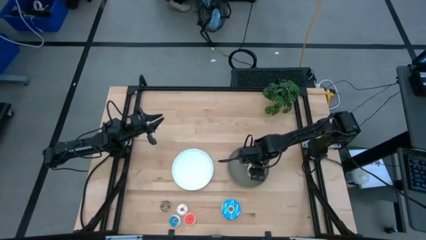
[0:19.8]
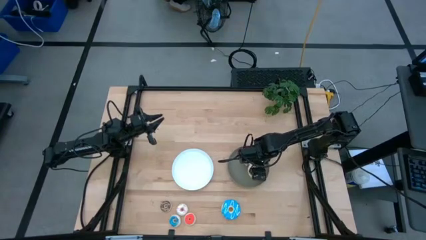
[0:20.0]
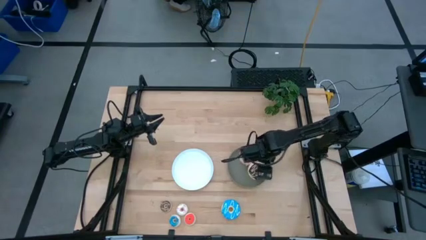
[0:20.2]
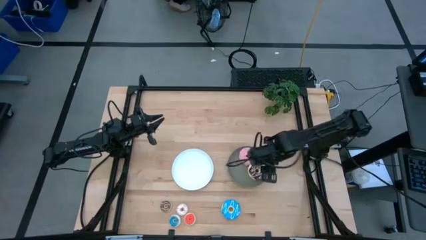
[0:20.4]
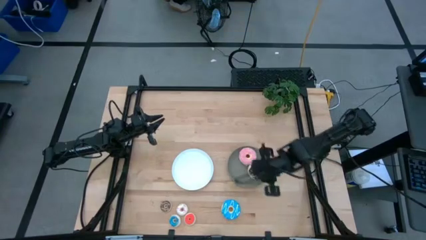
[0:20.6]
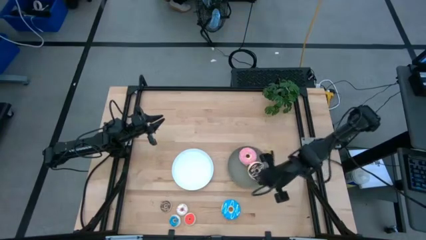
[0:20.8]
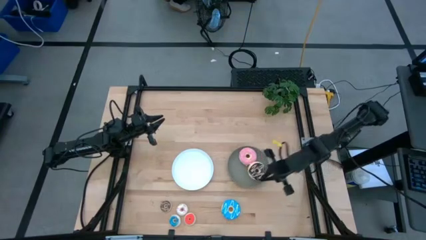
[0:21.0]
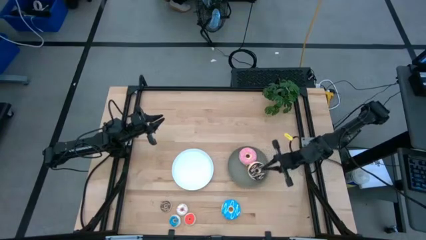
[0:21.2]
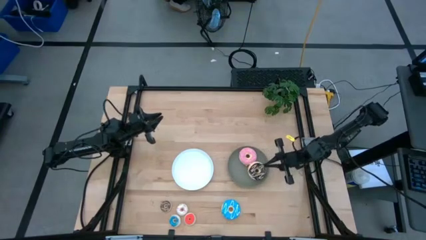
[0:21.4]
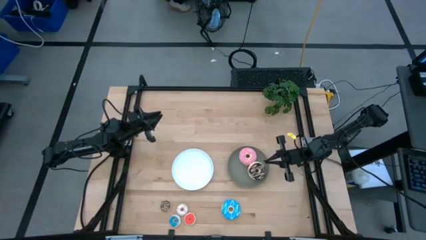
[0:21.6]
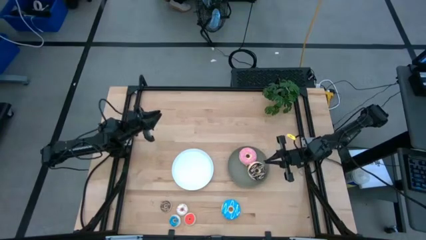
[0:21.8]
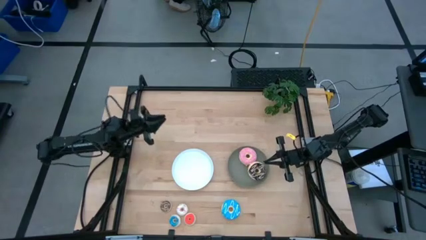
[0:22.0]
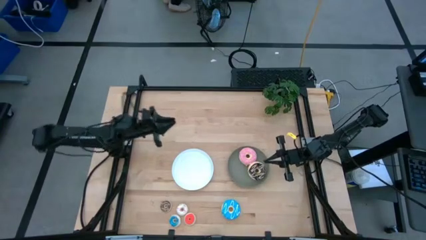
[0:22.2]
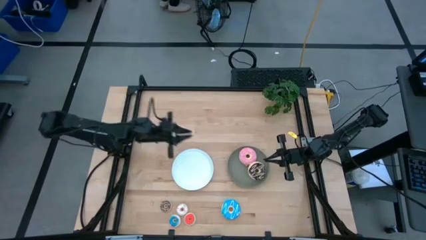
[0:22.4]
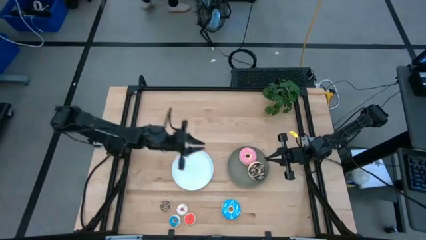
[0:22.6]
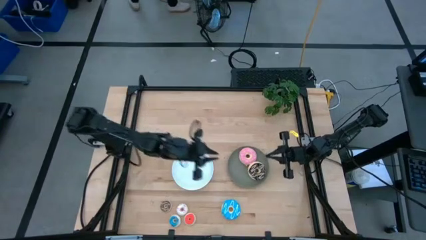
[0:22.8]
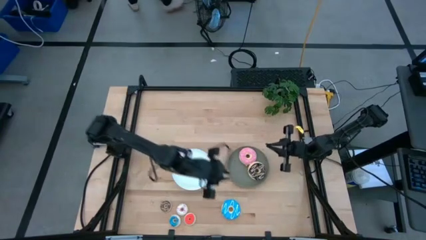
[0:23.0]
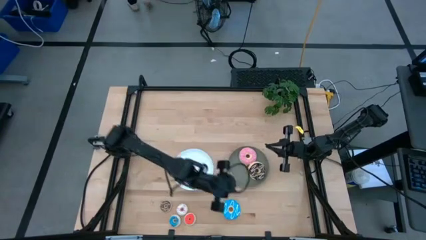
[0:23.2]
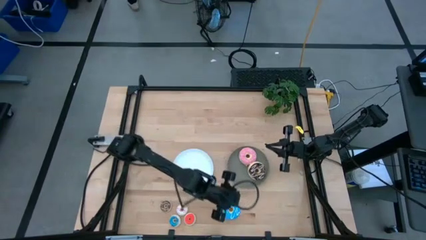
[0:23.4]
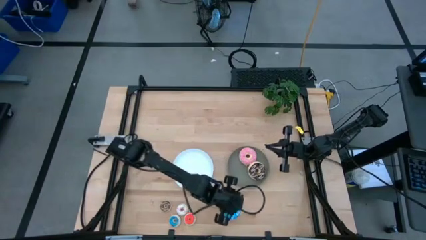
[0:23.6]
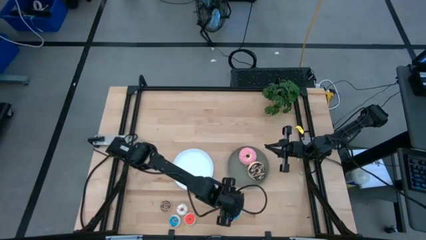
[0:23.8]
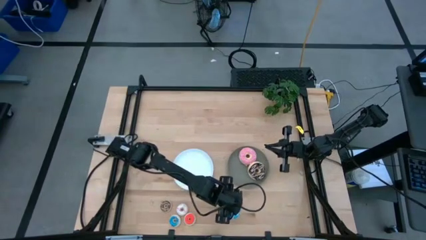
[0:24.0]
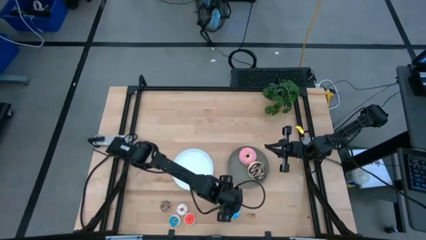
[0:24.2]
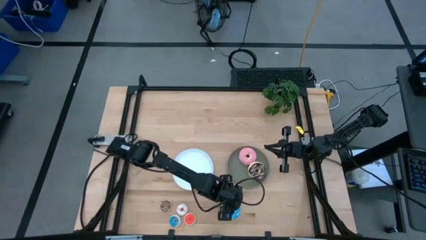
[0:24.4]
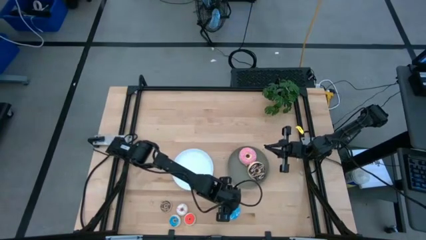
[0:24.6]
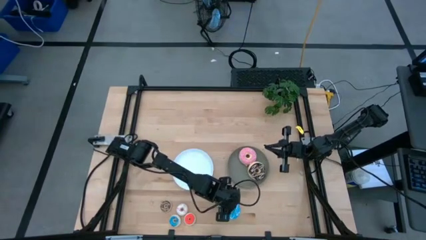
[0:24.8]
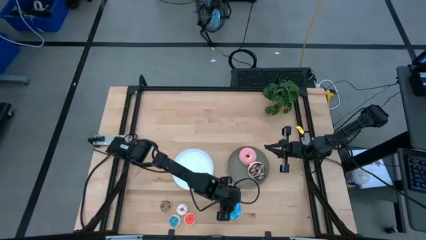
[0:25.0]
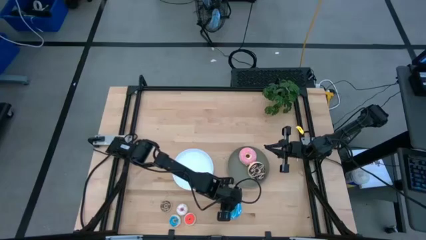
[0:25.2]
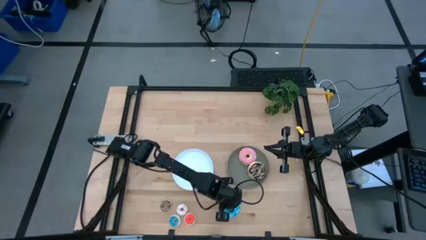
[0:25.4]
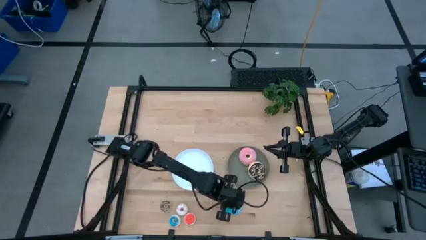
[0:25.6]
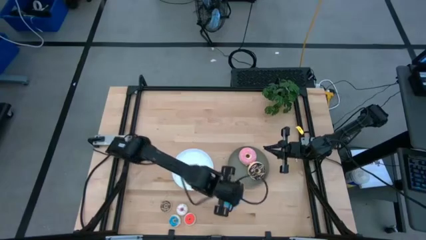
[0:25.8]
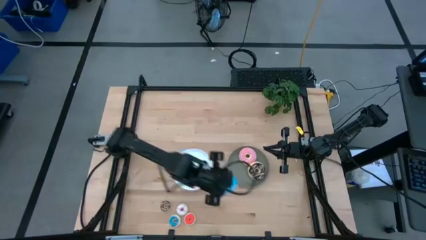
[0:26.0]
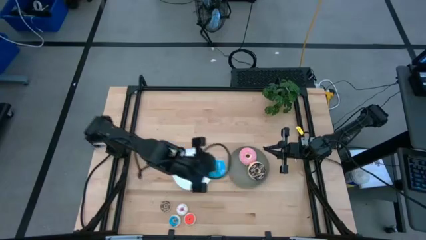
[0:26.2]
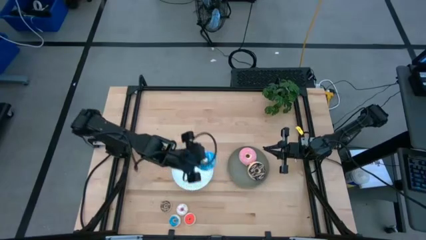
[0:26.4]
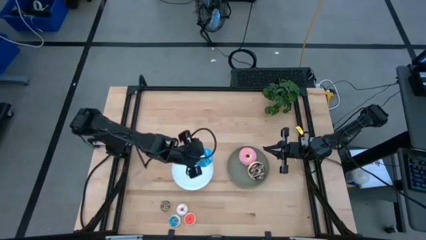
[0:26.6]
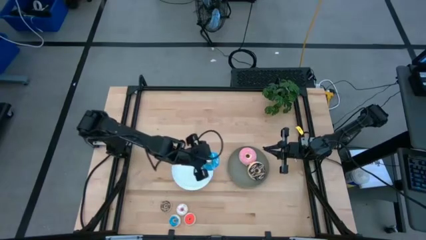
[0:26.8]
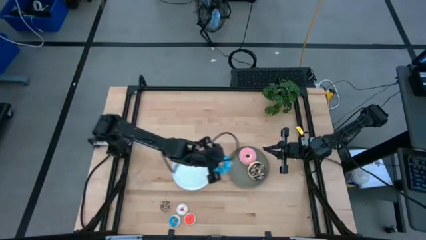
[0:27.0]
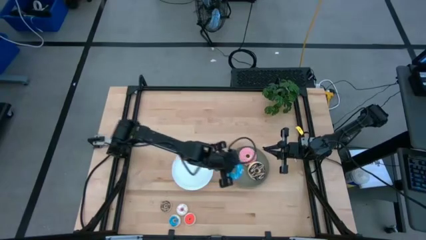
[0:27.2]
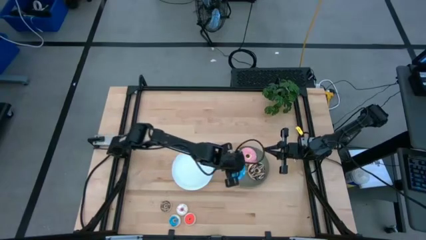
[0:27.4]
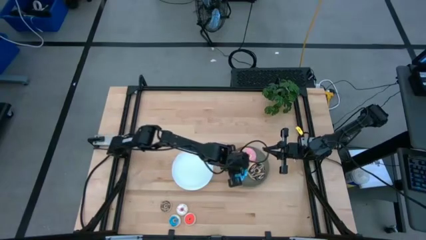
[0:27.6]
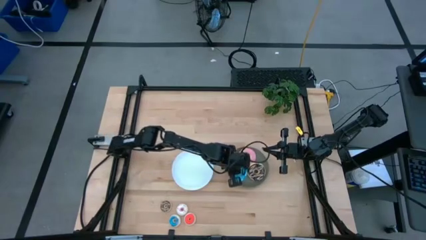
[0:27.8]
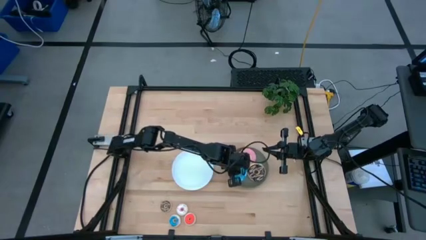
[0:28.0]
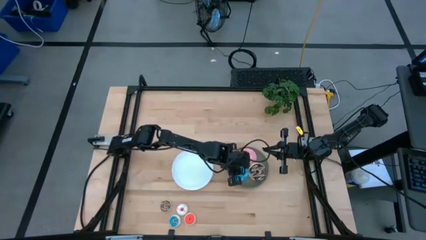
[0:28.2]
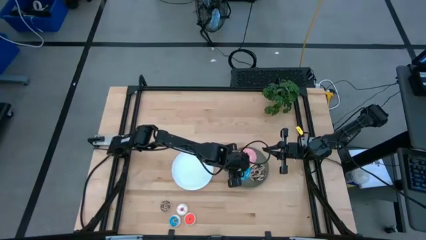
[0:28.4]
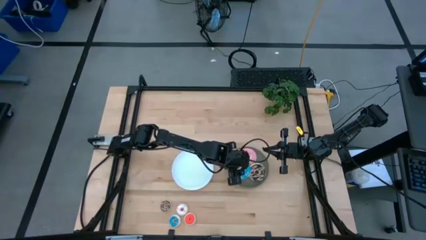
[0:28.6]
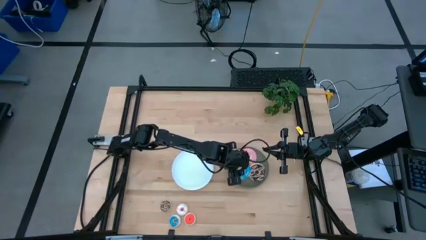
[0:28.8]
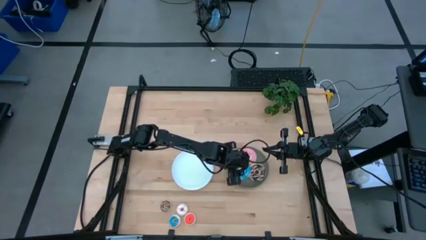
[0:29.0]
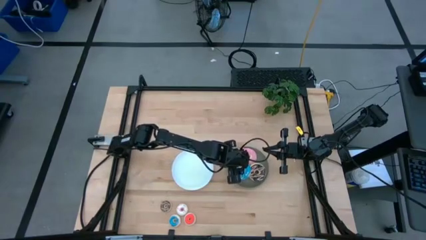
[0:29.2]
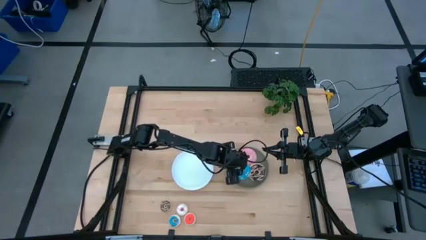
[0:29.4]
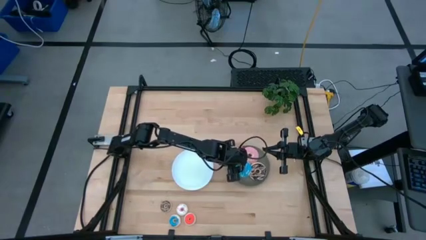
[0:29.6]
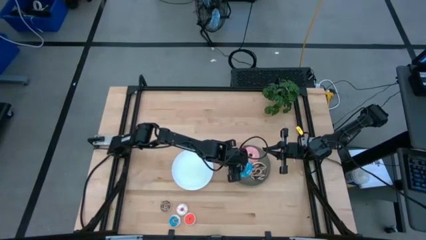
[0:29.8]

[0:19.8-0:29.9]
Task: Pick & Place donuts
Put the large blue donut on the gray plate

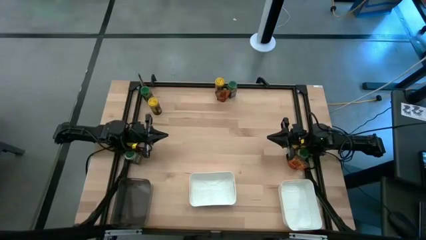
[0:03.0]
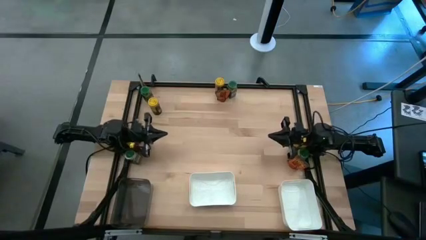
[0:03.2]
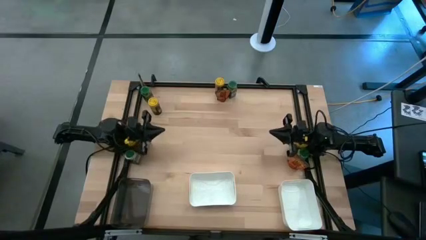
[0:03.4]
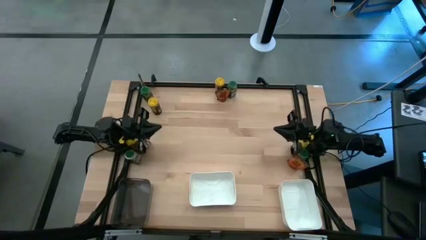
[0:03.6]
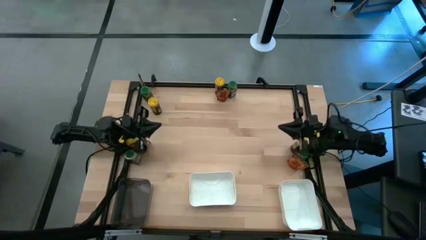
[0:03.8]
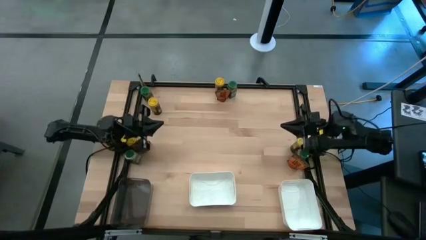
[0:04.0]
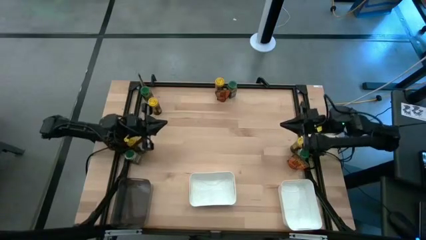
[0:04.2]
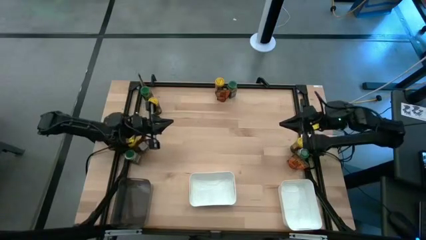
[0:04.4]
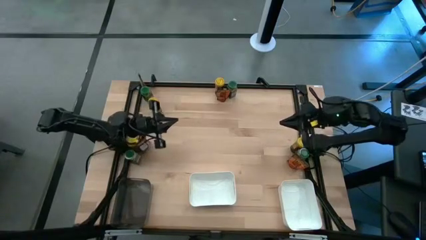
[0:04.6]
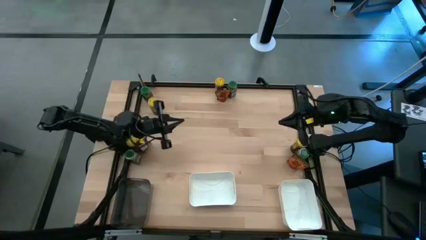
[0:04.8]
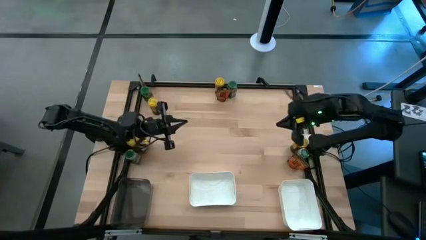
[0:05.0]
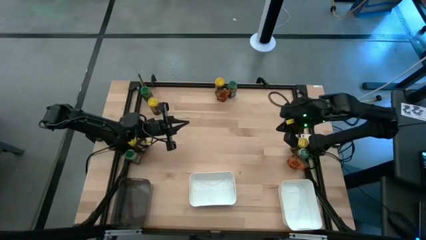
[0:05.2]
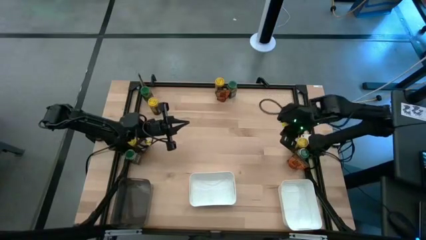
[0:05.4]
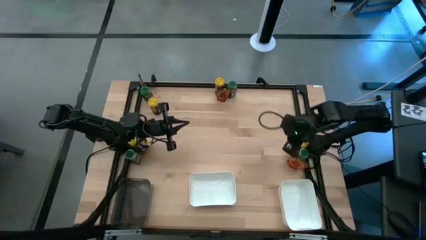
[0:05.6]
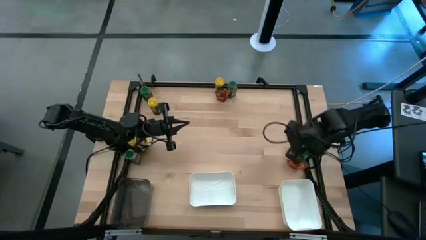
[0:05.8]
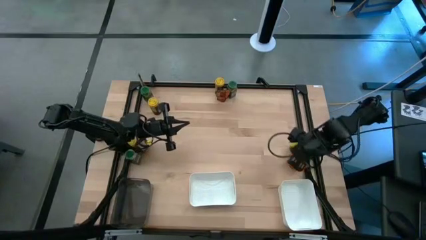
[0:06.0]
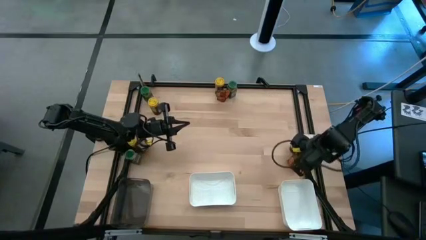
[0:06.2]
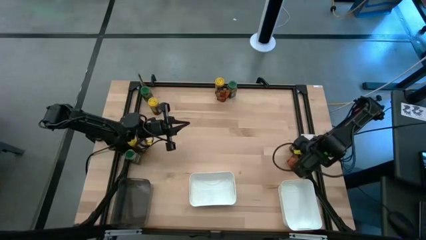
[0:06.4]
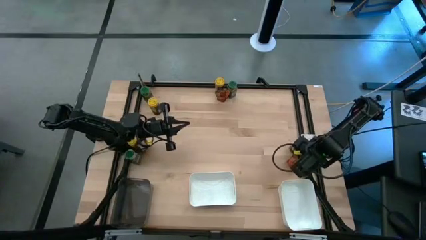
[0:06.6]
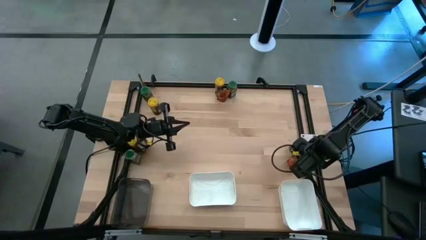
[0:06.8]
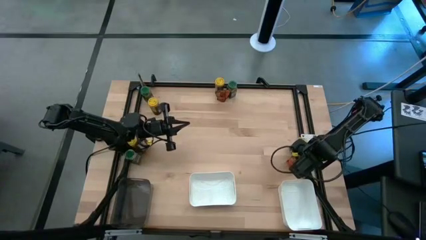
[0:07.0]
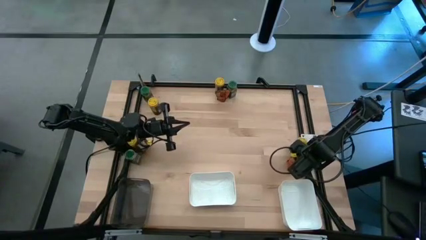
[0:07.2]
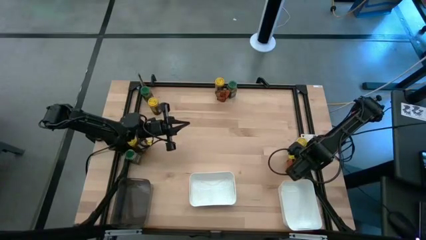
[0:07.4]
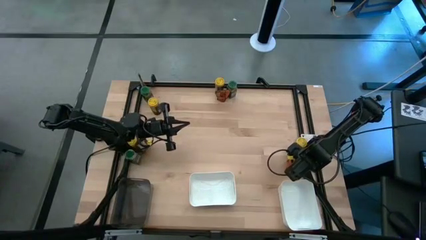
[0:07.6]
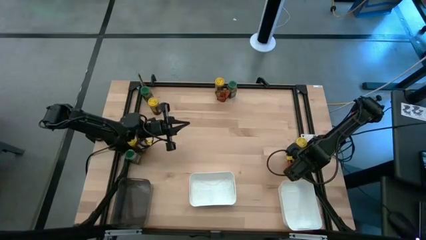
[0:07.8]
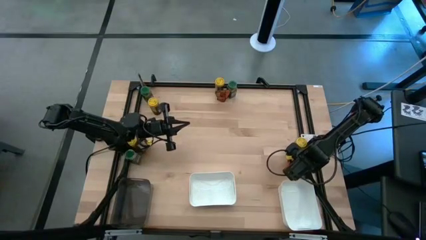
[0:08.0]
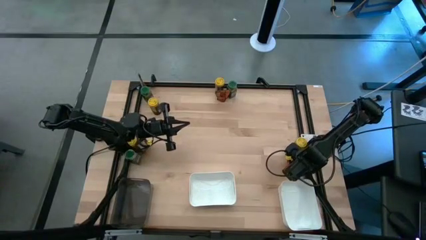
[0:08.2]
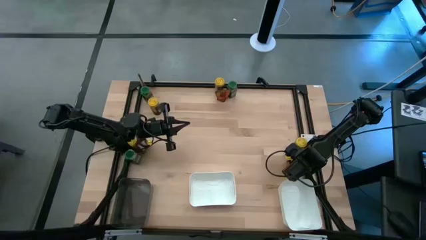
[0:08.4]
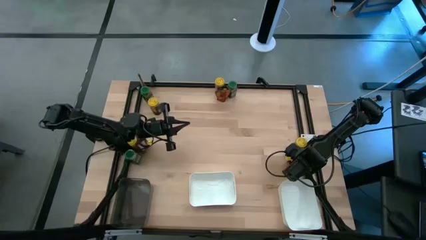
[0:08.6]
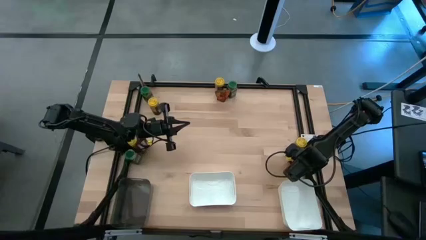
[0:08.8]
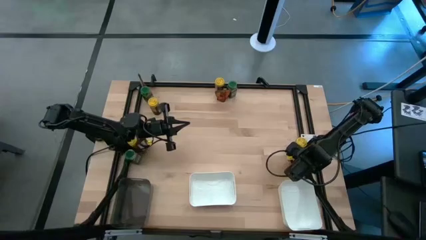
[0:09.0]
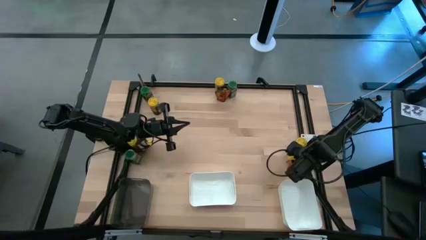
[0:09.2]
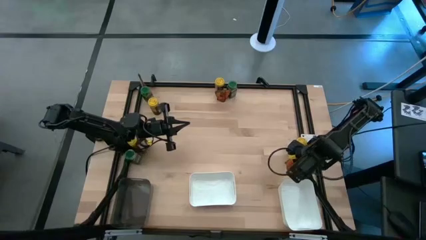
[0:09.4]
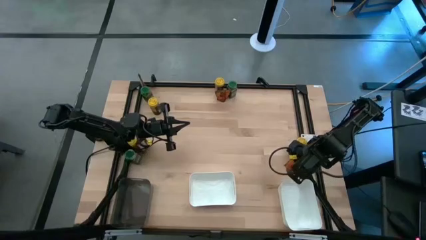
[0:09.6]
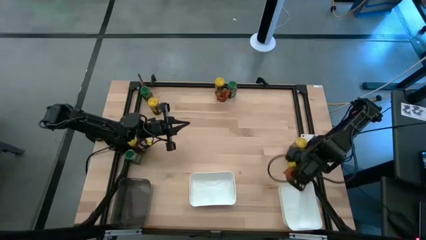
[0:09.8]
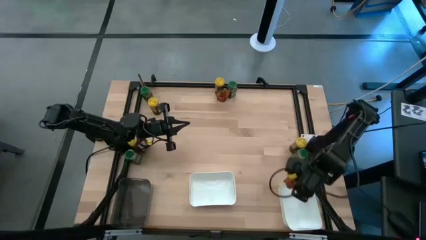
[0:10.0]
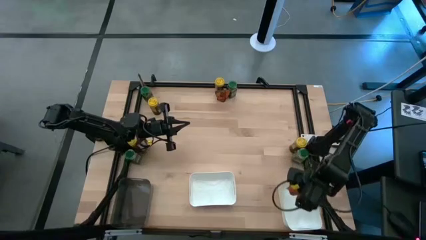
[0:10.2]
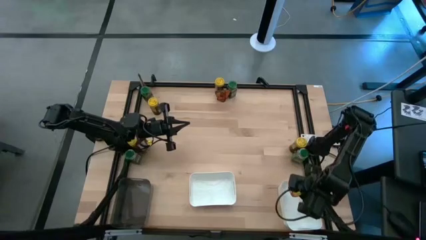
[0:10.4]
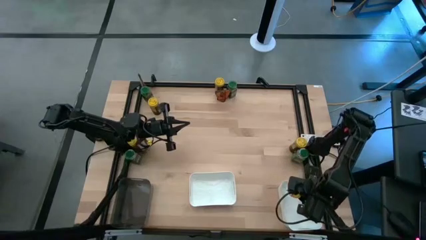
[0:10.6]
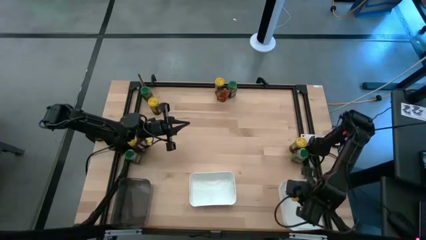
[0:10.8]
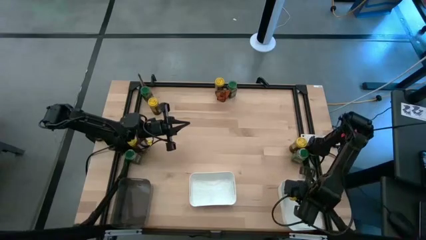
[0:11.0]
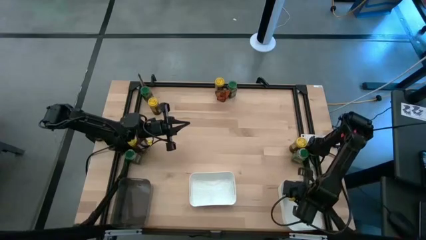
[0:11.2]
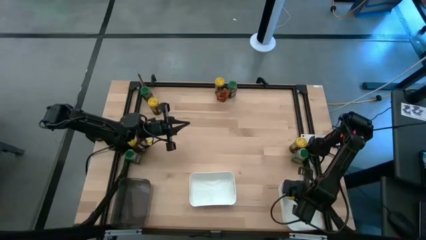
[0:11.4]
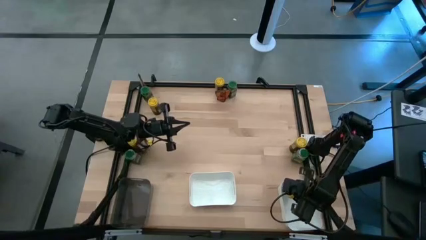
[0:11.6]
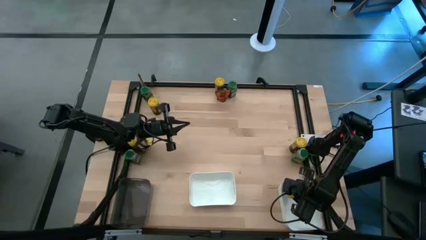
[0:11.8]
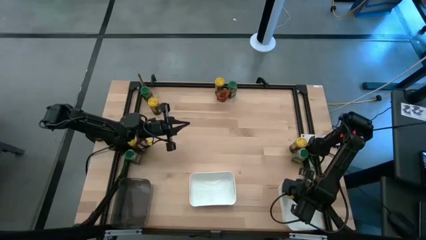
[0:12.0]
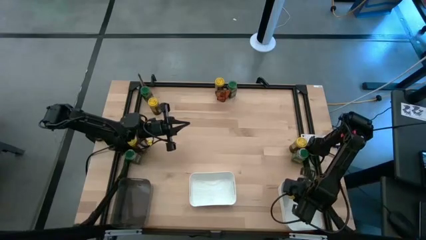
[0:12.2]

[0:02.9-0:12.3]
Task: Sort spices by type
Put the bottom right brown seasoning bag into the right white bin
